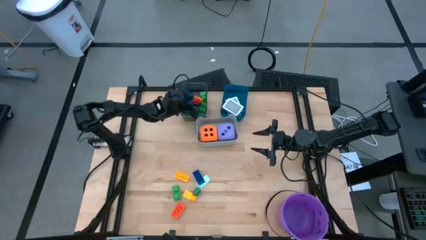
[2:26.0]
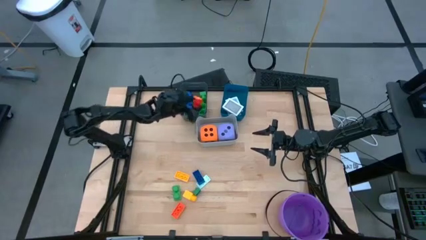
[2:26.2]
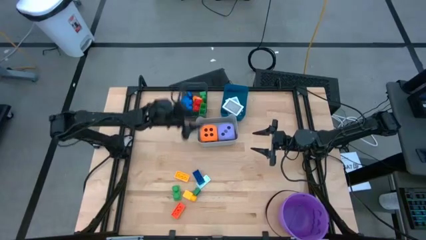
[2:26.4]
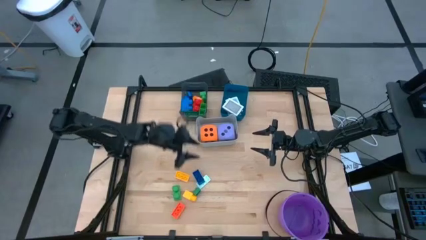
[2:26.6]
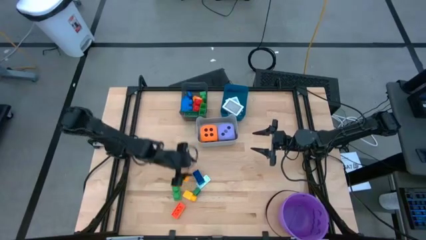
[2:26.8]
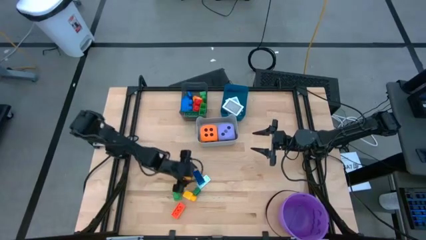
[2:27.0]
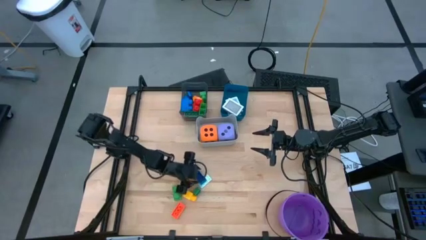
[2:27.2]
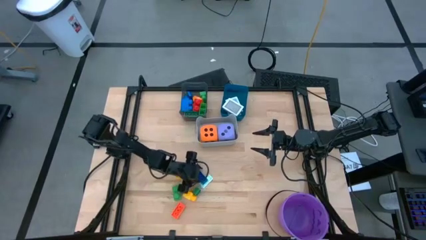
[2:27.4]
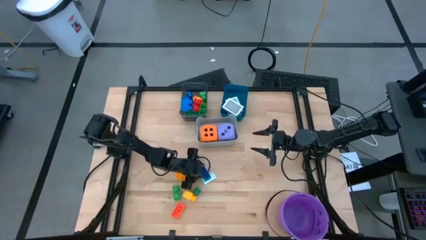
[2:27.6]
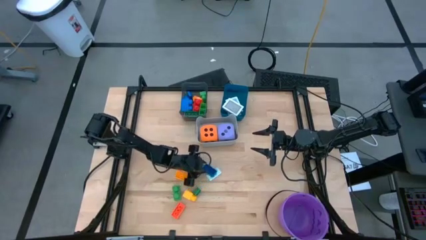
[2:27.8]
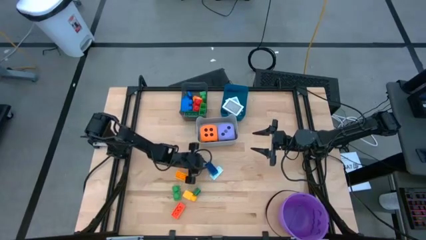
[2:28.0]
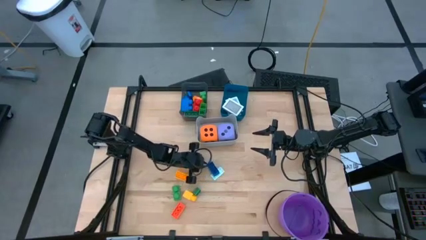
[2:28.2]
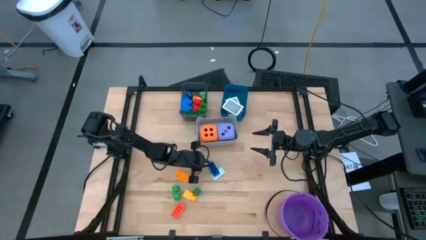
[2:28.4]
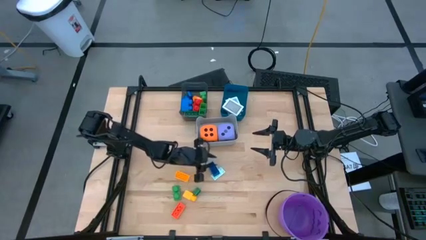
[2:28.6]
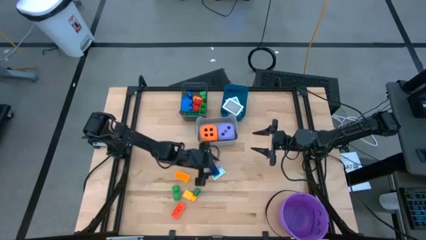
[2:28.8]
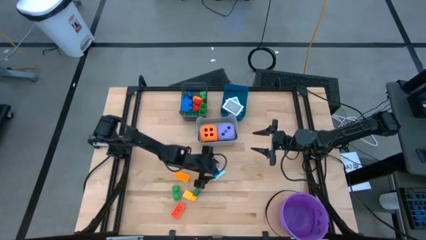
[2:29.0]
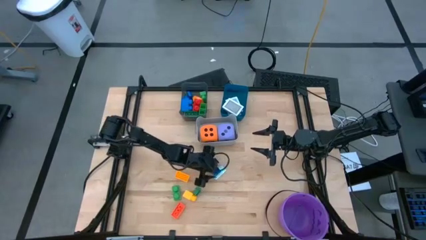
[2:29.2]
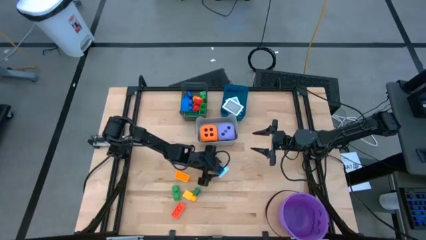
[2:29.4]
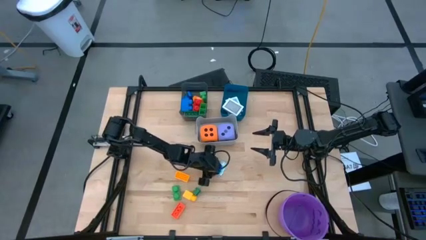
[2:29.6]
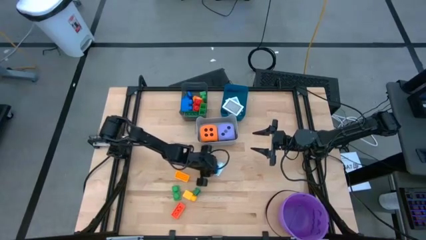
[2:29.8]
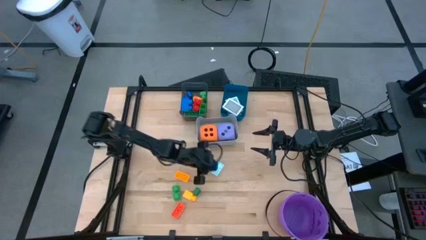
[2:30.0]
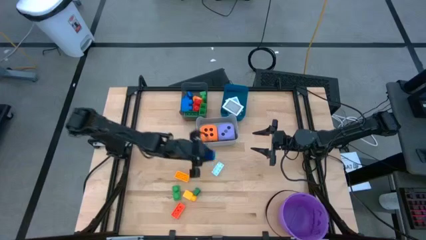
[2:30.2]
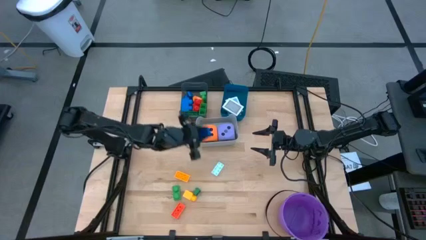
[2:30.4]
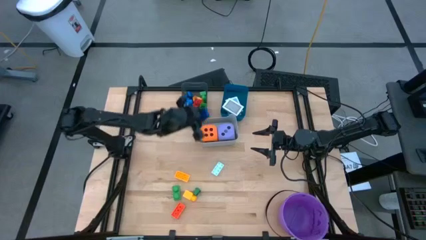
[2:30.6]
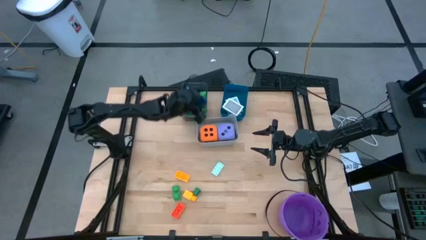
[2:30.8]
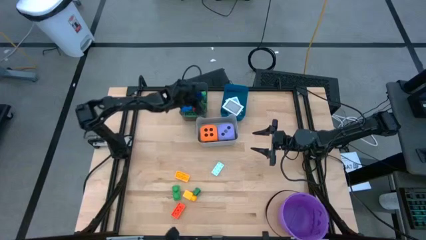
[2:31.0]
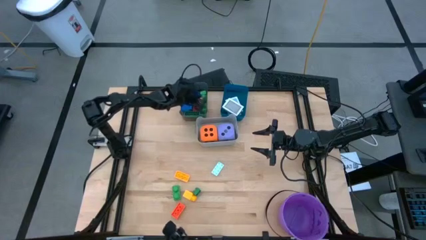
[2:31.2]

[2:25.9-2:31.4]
Task: Pick & Place Toys
Put the dark blue game piece into the black bin

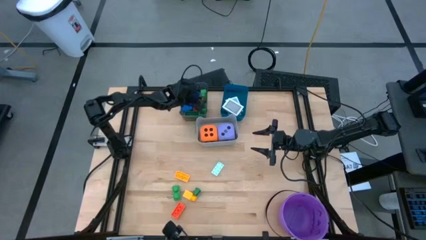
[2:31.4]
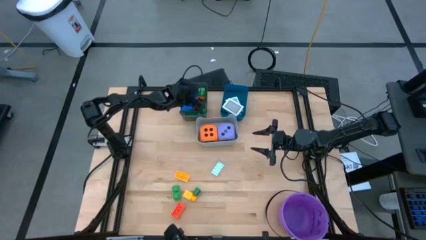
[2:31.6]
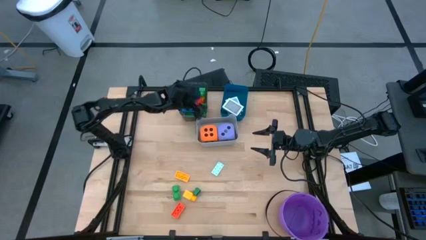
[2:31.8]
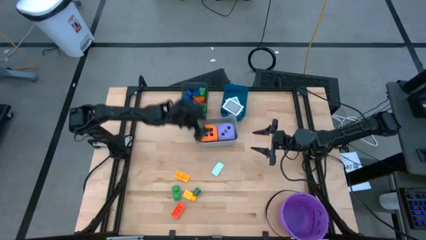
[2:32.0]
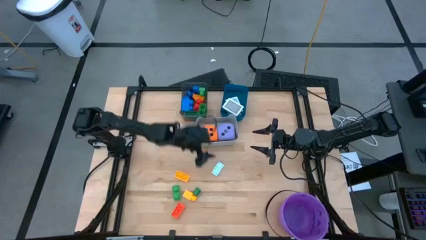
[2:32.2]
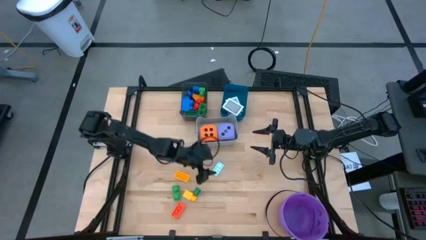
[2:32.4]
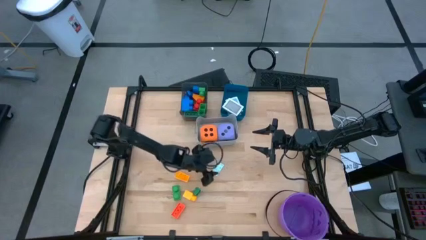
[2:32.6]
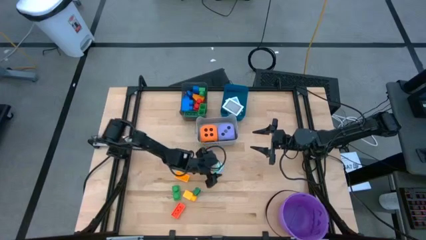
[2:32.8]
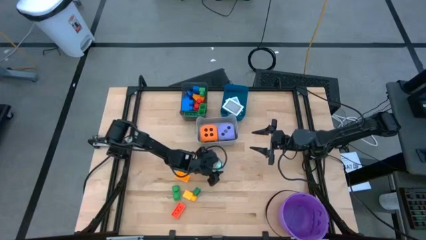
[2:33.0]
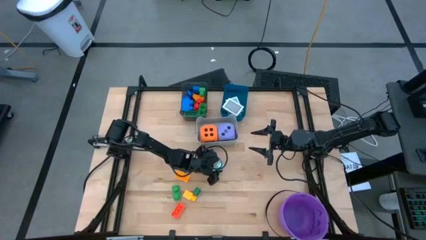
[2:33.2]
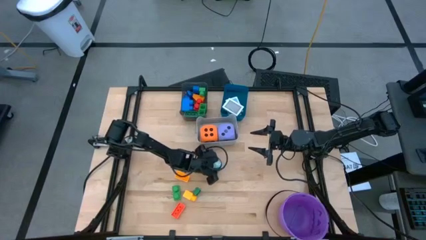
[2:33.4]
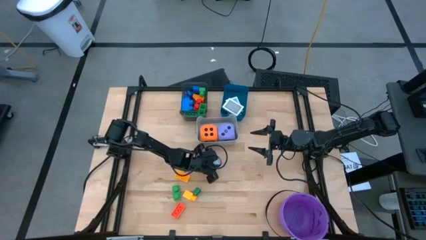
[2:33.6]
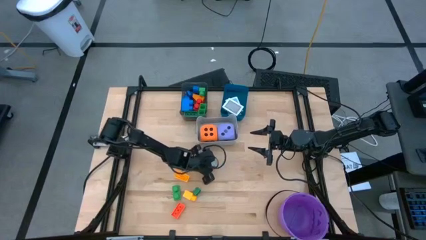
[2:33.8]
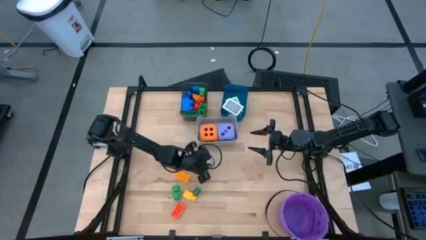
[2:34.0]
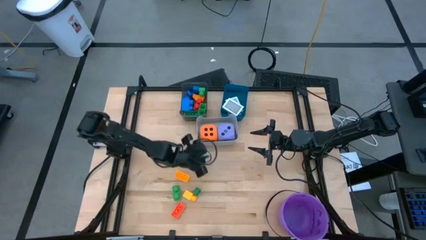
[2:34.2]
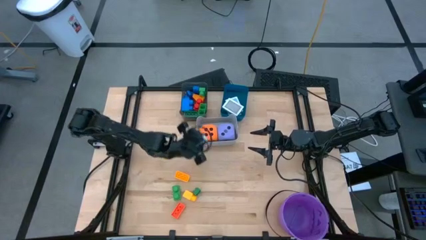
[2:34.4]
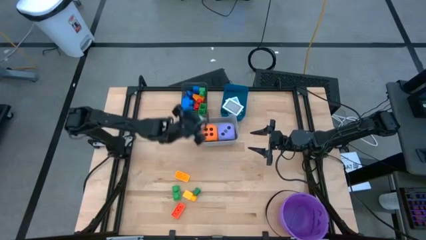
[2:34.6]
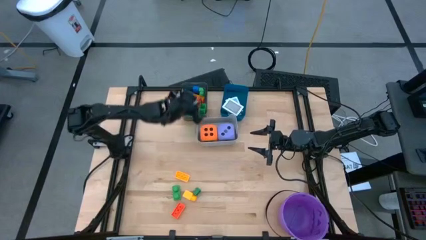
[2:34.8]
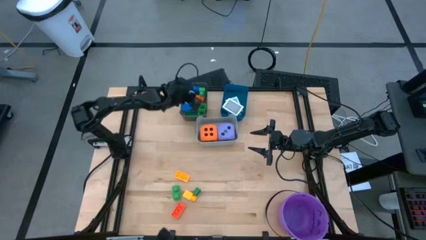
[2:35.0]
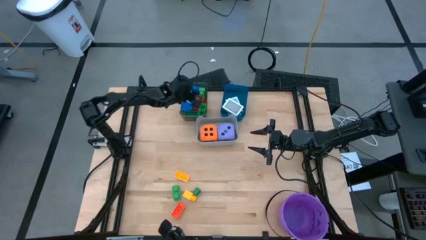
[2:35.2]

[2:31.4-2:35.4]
Put the white game piece into the black bin

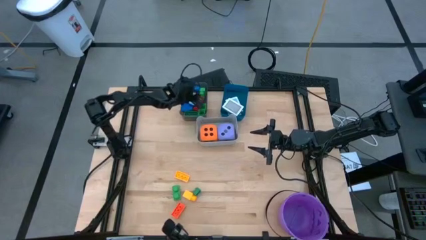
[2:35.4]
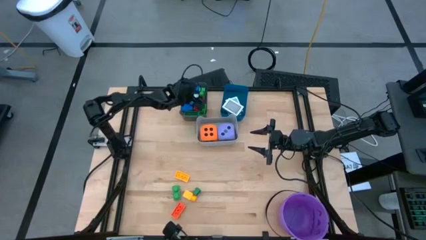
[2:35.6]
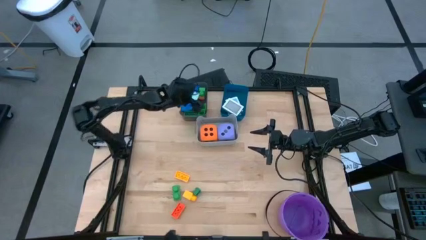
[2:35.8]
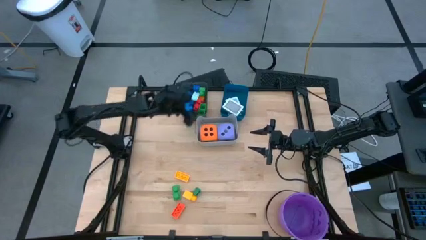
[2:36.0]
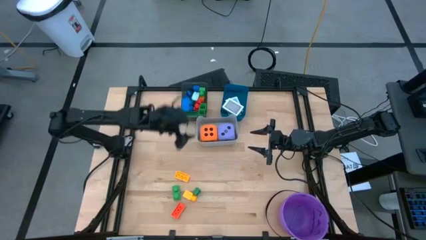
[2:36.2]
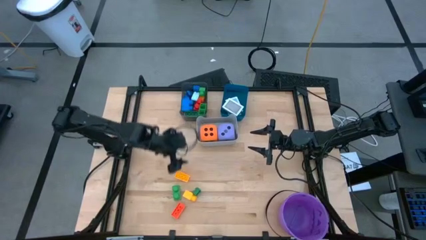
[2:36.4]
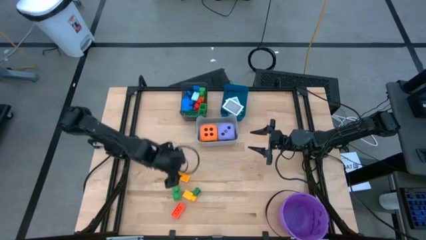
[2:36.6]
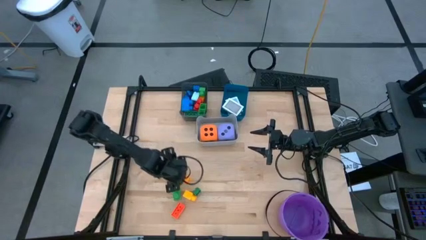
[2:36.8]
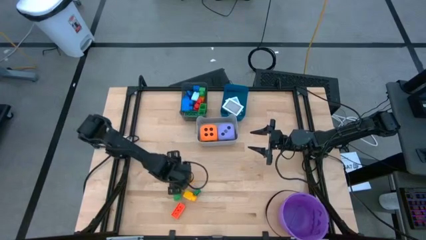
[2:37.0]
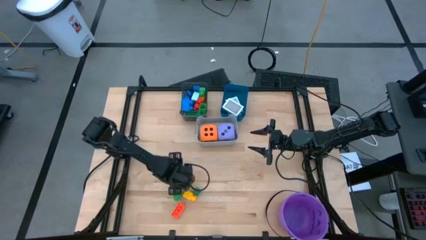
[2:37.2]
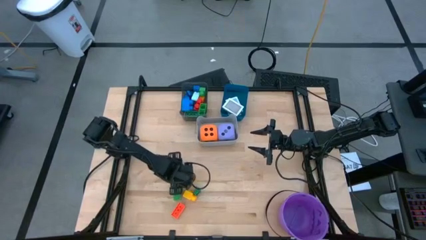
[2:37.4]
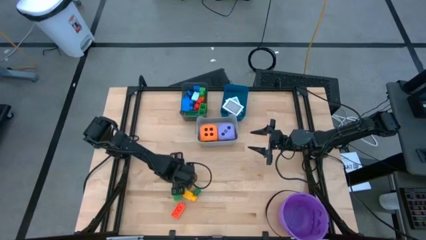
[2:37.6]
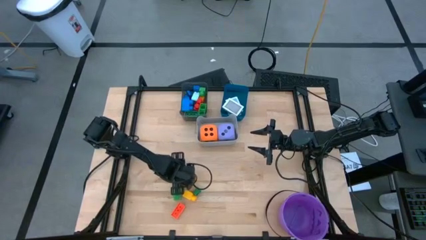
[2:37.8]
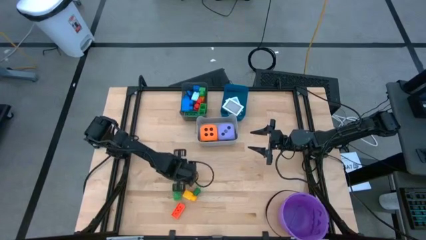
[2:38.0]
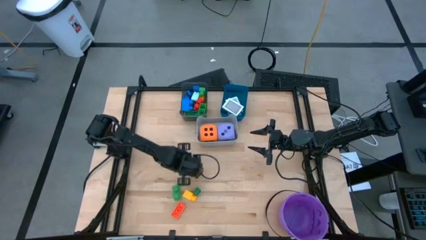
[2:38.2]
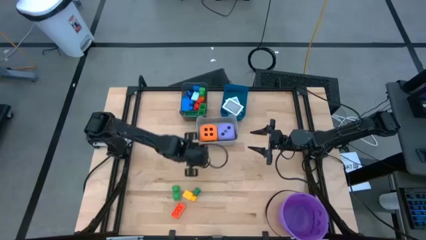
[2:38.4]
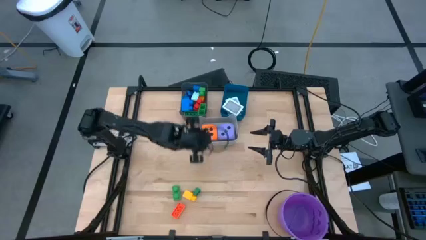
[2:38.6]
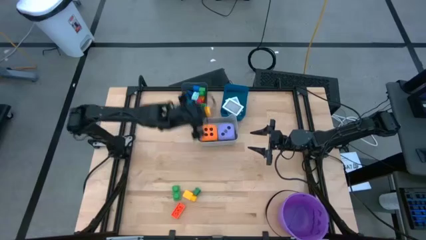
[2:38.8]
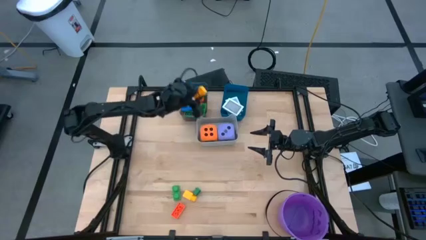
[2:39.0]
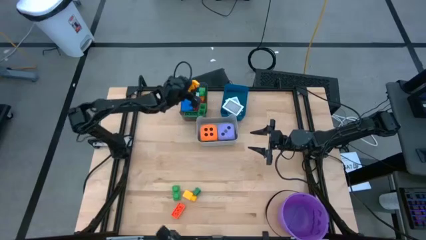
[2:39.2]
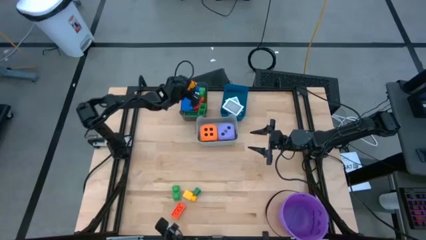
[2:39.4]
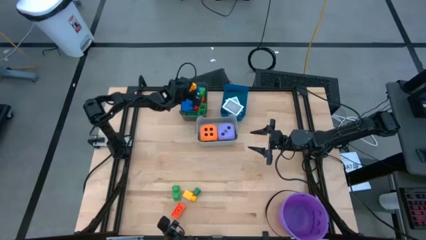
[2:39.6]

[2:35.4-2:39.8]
Put the dark yellow game piece into the black bin
